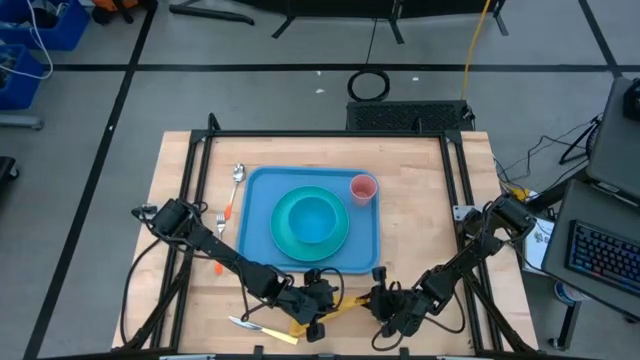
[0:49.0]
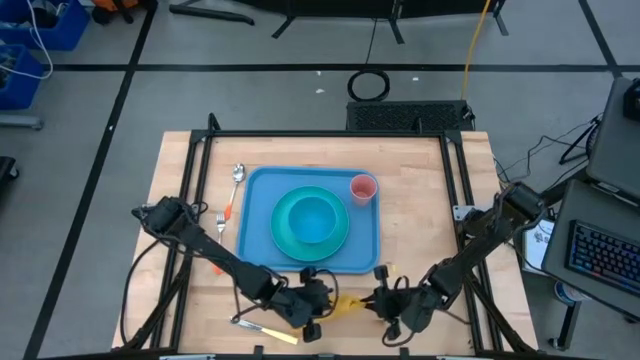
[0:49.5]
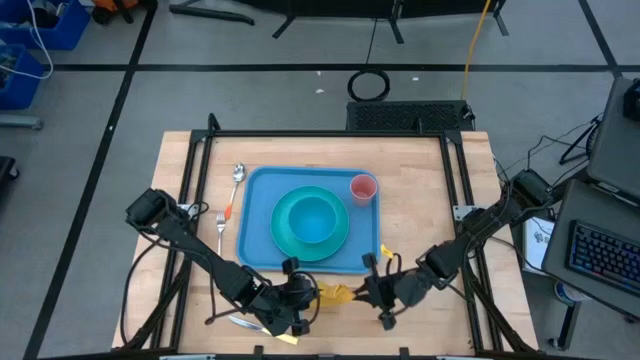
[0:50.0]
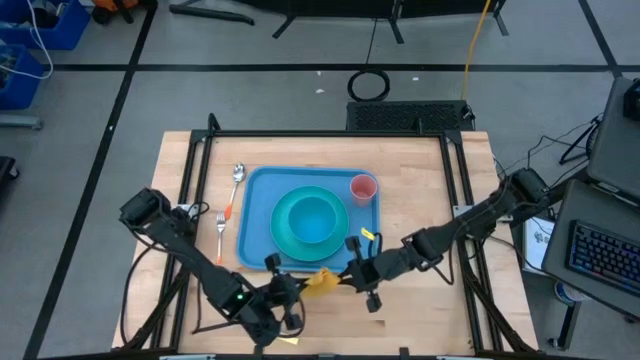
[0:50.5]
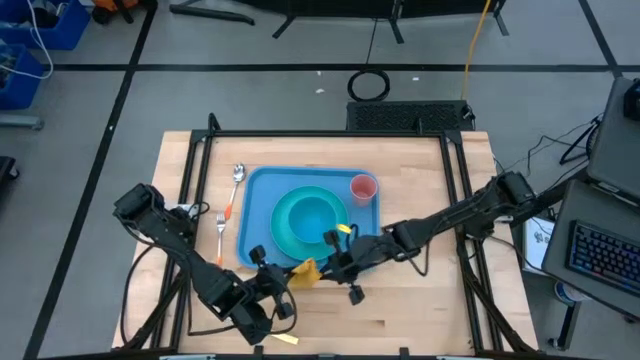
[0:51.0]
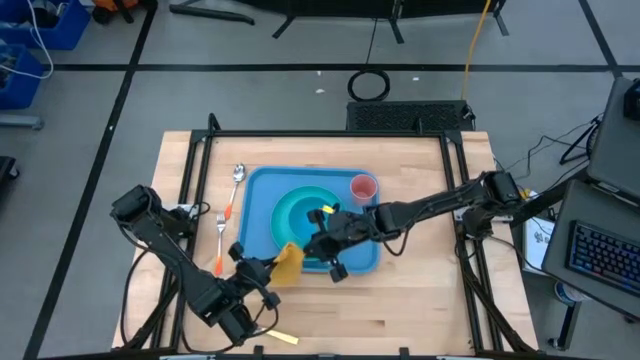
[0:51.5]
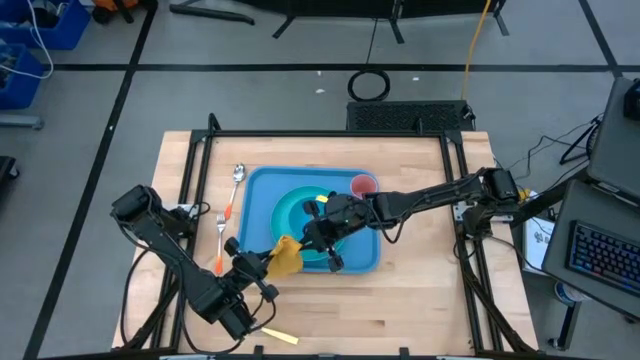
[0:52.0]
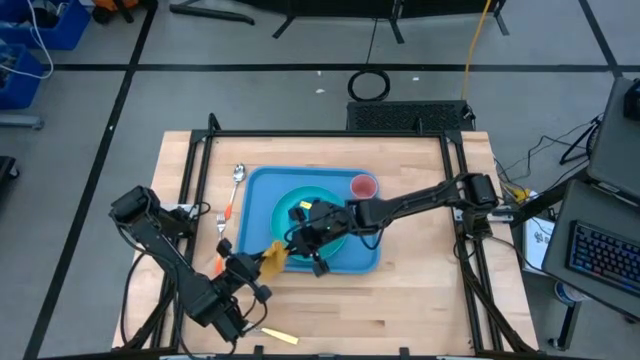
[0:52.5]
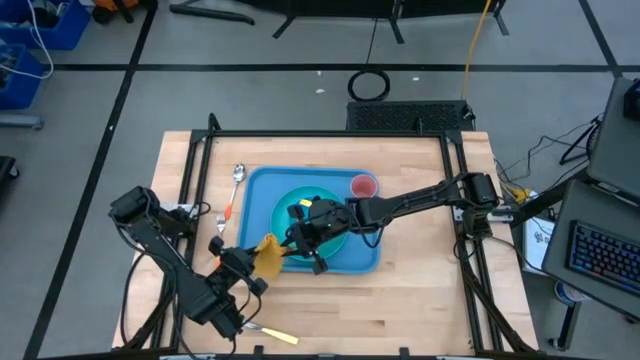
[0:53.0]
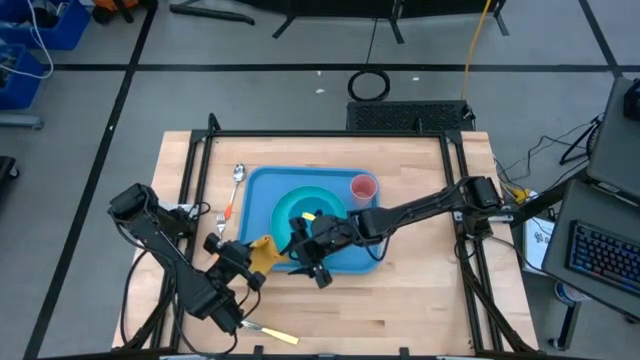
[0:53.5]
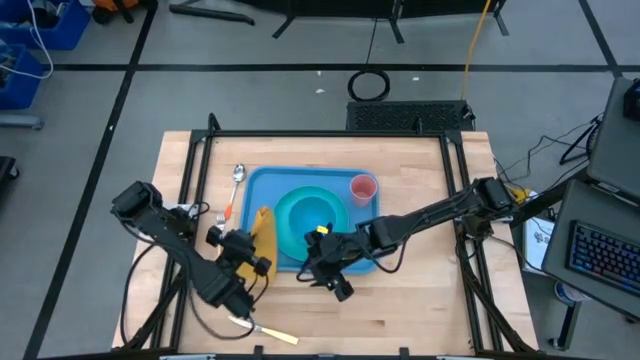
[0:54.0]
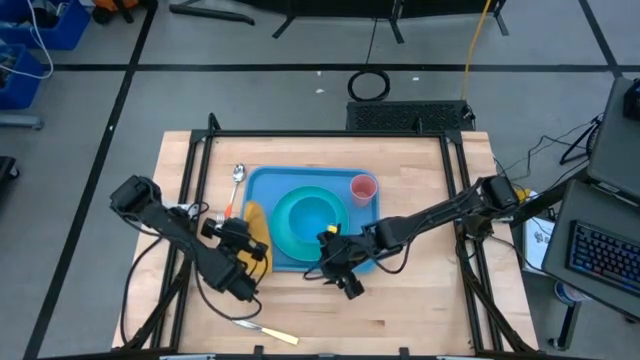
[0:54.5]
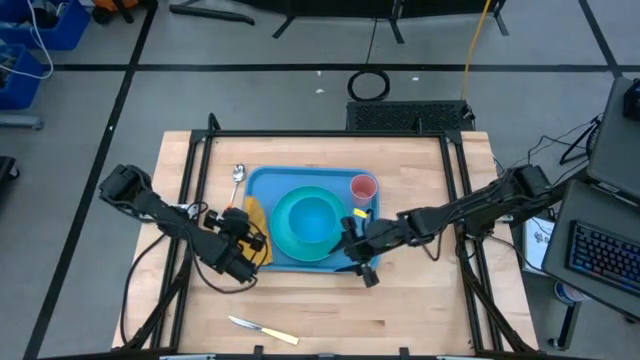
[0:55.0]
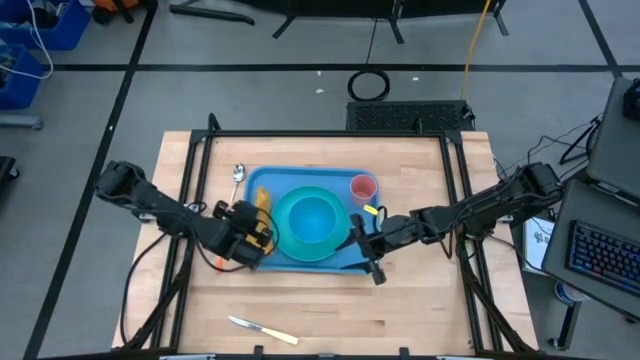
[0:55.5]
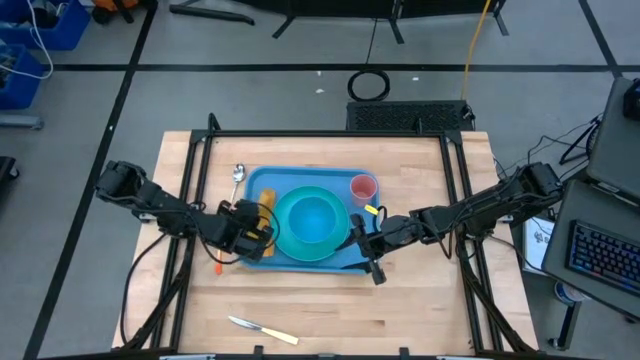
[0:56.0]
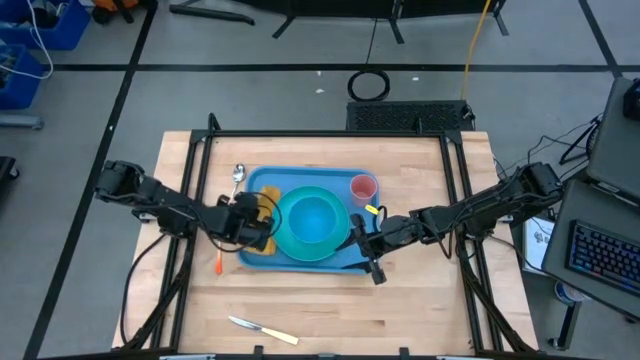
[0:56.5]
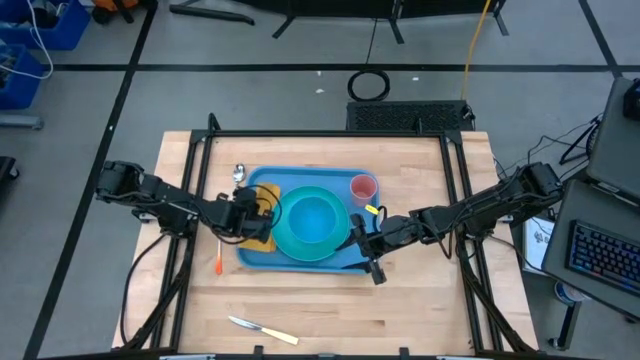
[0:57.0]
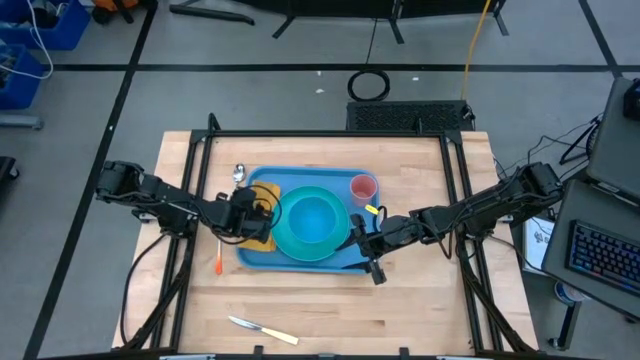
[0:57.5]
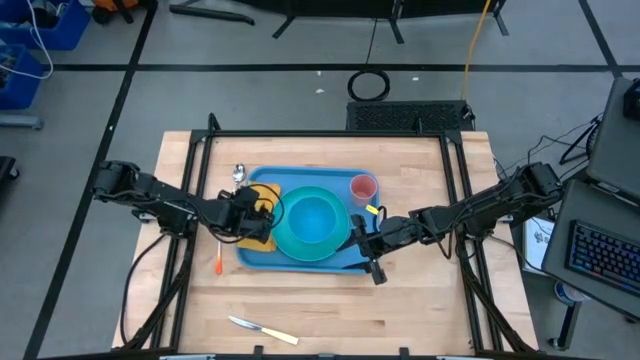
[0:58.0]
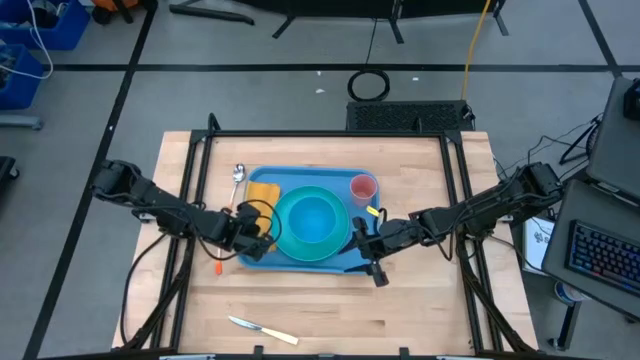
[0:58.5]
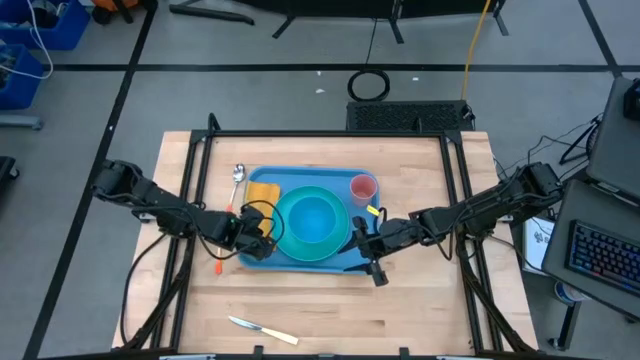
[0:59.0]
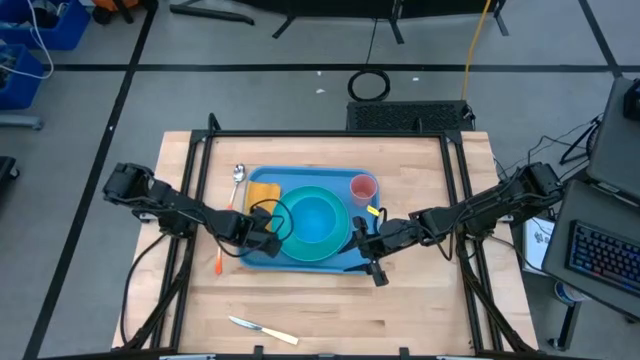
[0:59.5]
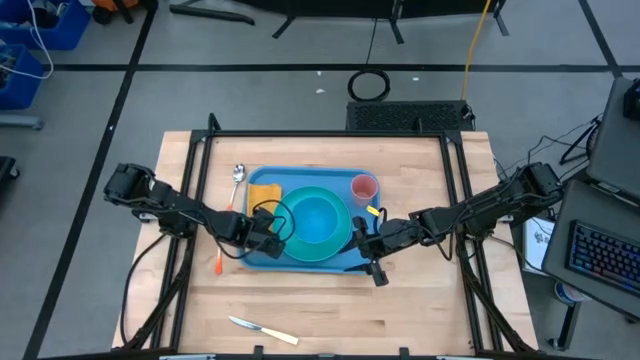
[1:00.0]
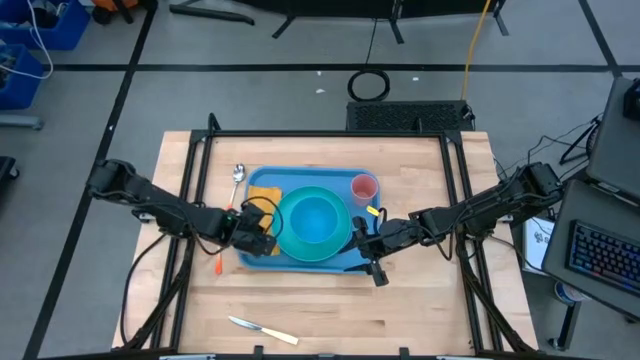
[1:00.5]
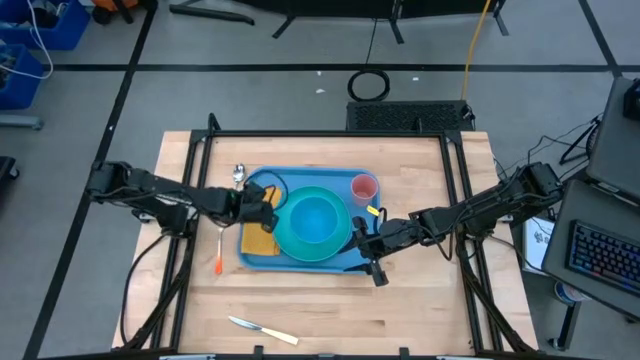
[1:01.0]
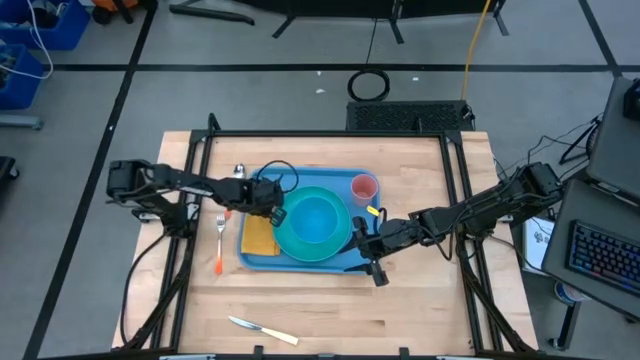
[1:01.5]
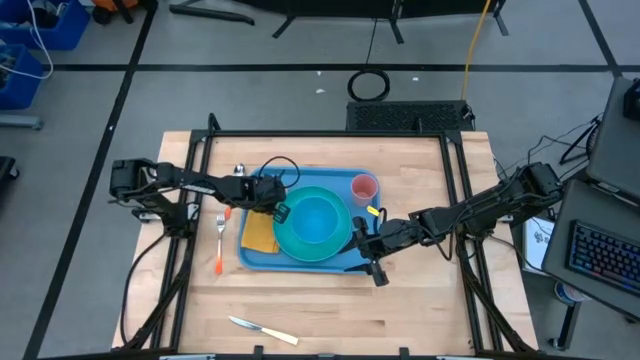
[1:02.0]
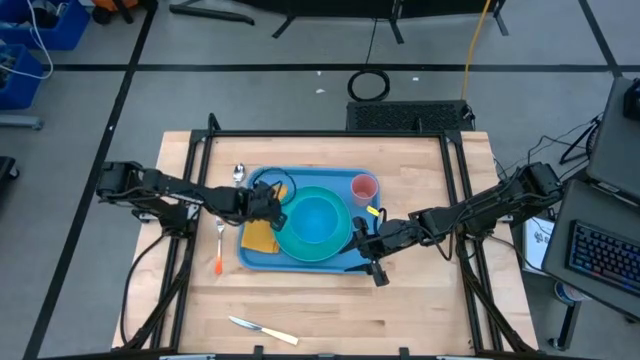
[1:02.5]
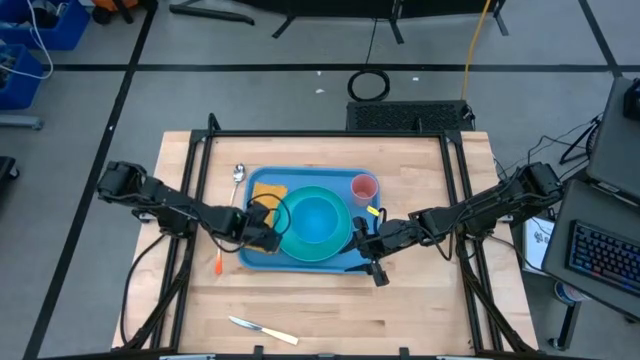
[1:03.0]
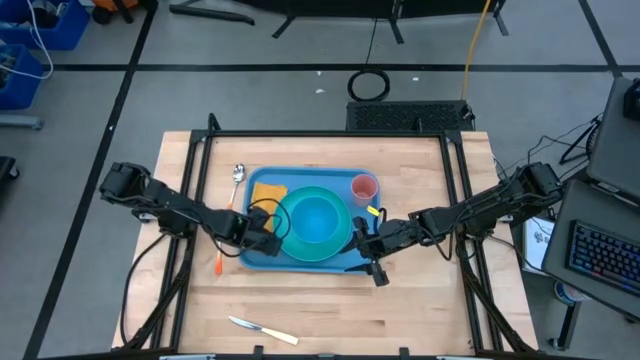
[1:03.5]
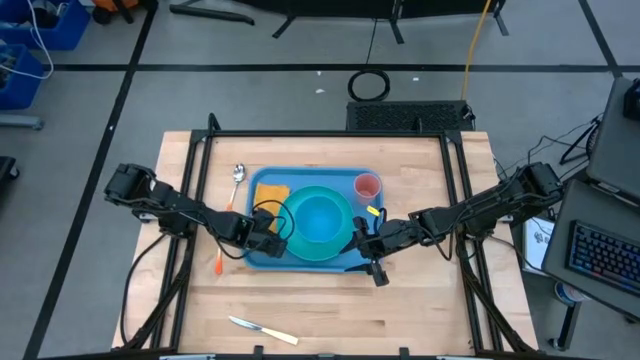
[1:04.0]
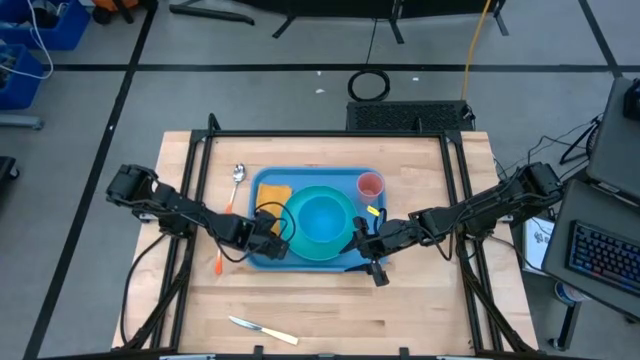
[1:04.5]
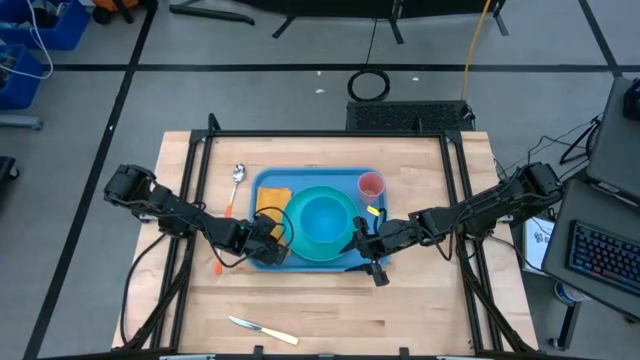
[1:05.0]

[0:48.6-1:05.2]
Task: Set up tray
Put the yellow napkin on the blue serving tray to the left of the blue plate

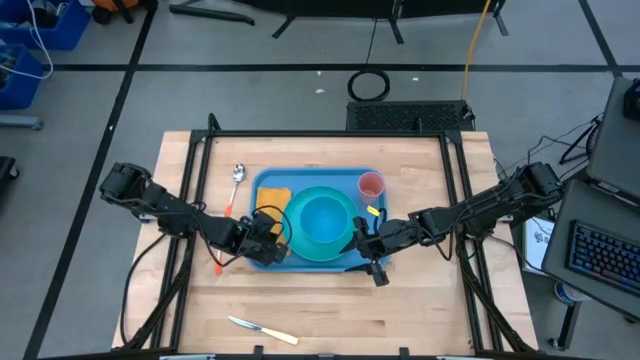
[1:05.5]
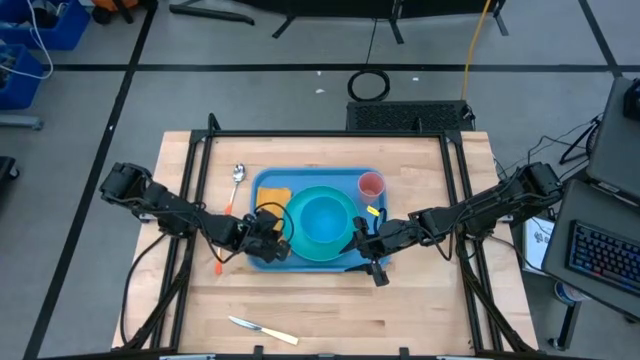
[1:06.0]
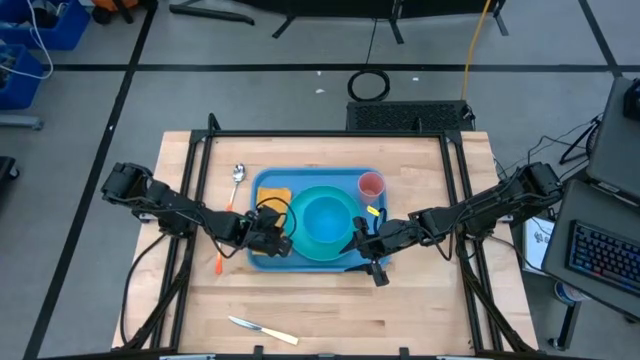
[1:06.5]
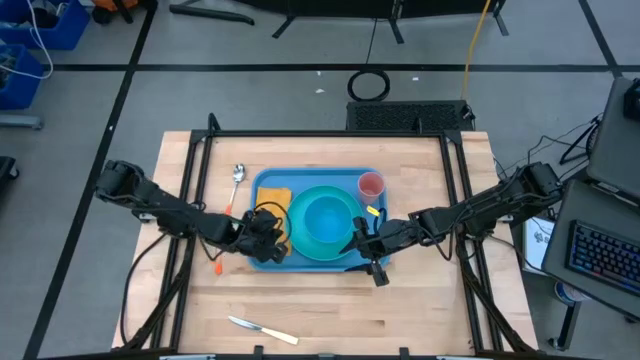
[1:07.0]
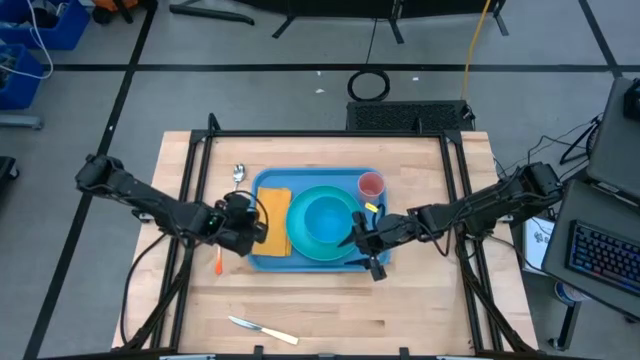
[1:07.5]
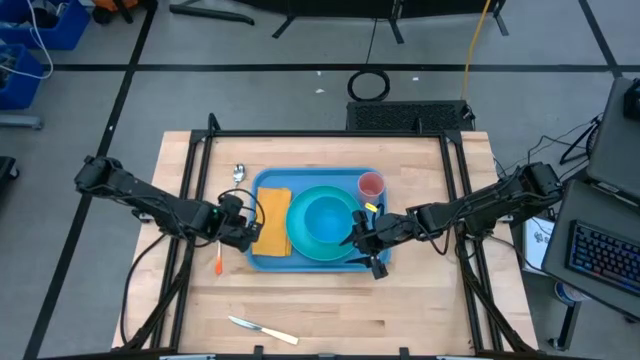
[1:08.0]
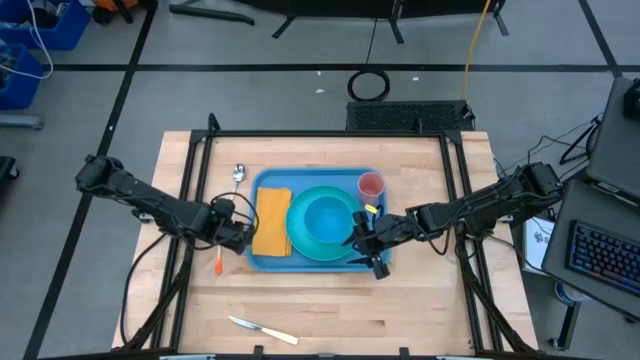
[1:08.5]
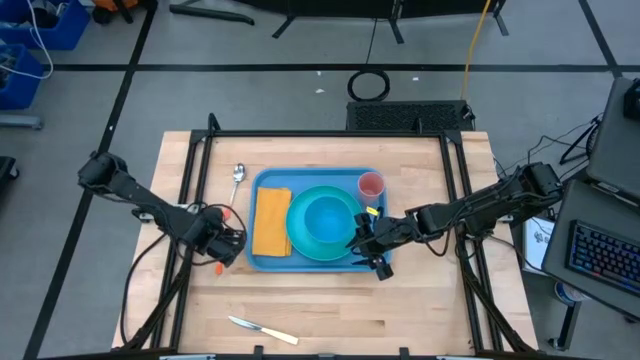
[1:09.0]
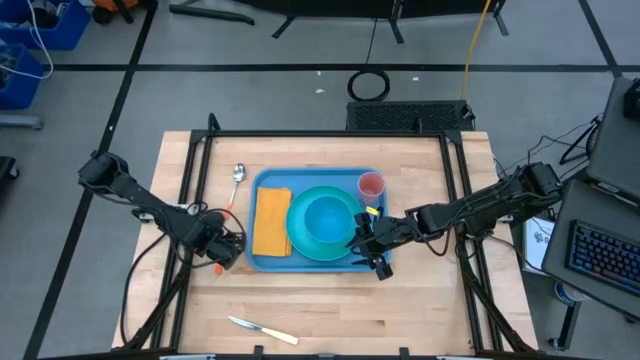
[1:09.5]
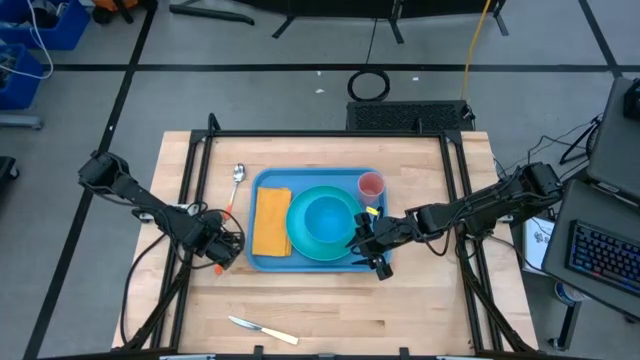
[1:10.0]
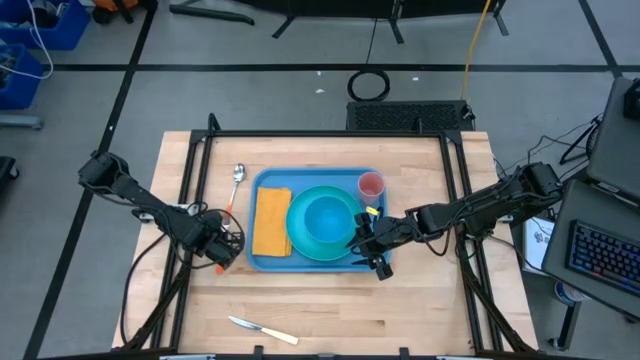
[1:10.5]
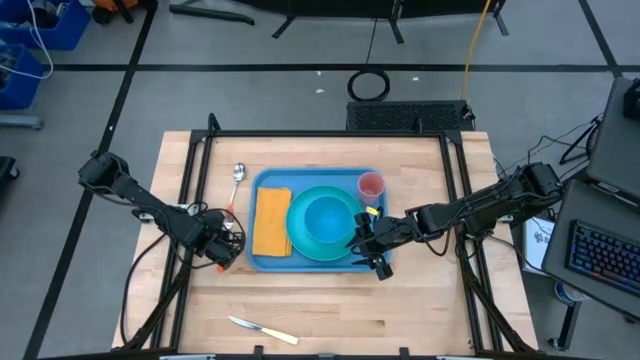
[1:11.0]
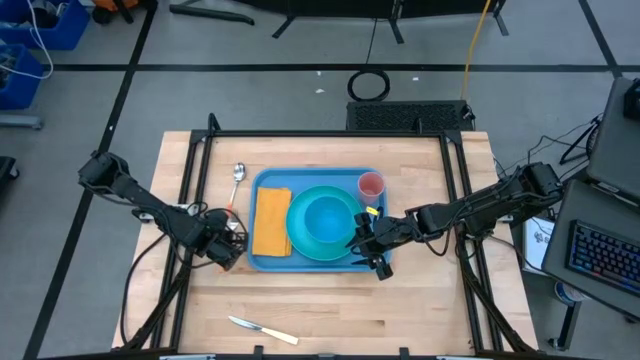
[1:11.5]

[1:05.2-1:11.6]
Put the orange fork on the yellow napkin
